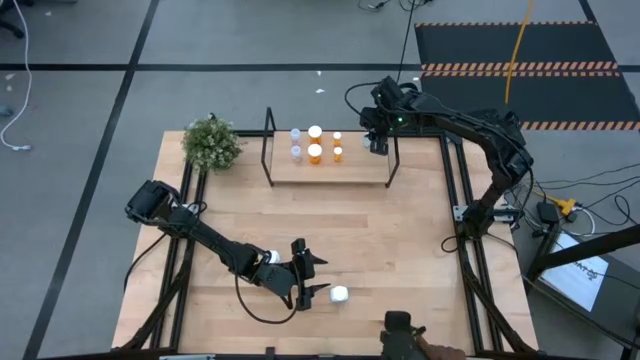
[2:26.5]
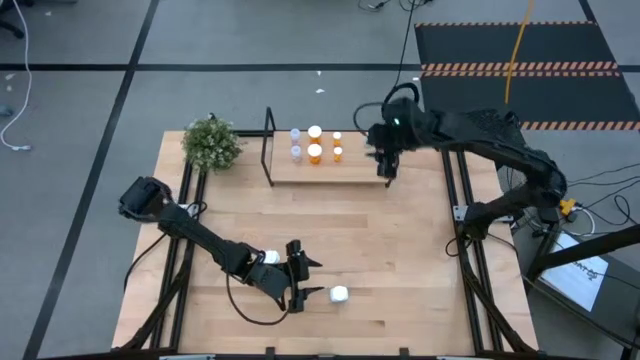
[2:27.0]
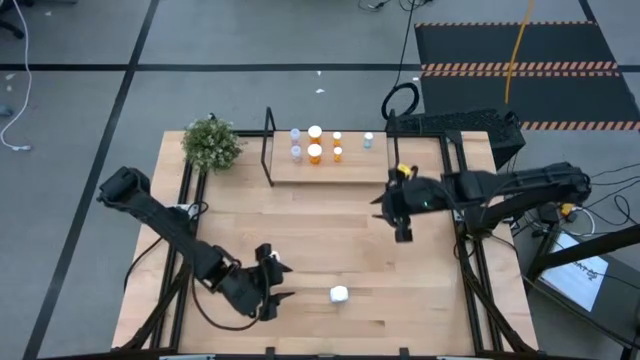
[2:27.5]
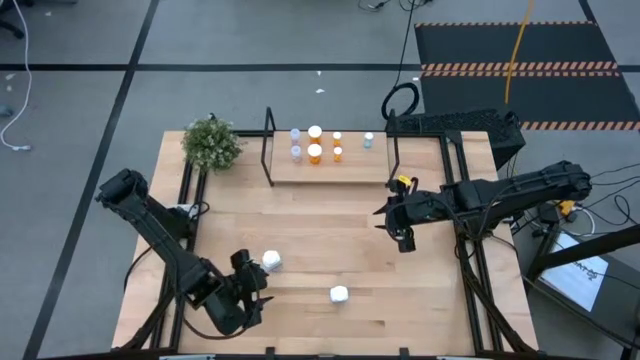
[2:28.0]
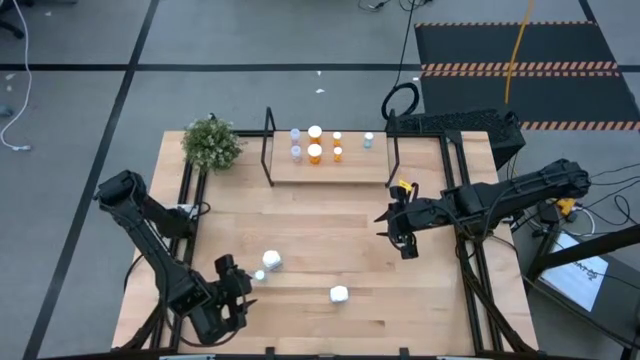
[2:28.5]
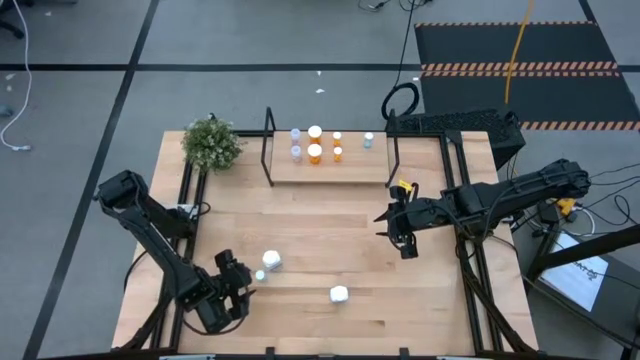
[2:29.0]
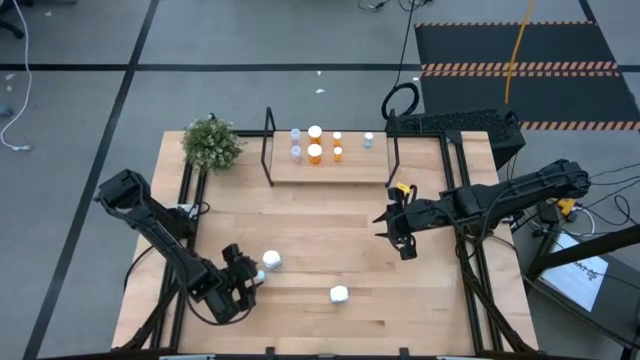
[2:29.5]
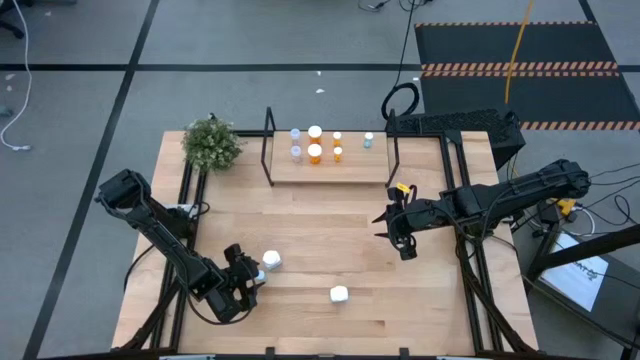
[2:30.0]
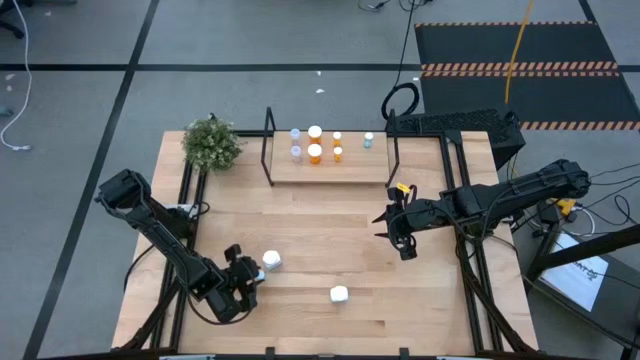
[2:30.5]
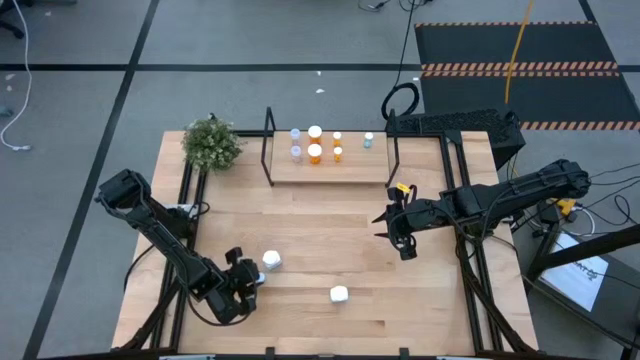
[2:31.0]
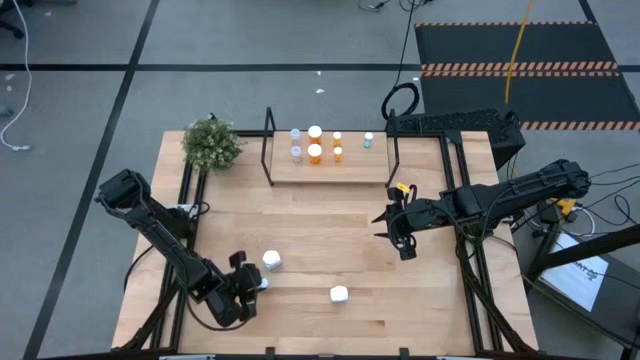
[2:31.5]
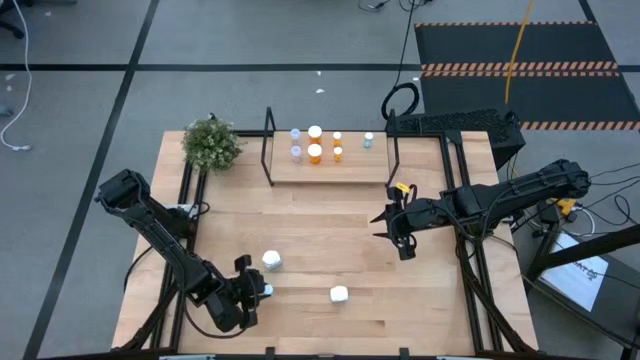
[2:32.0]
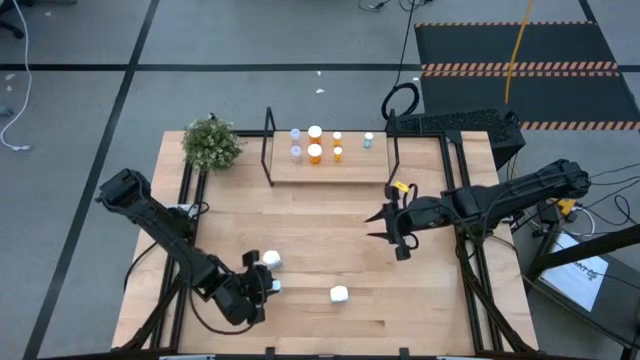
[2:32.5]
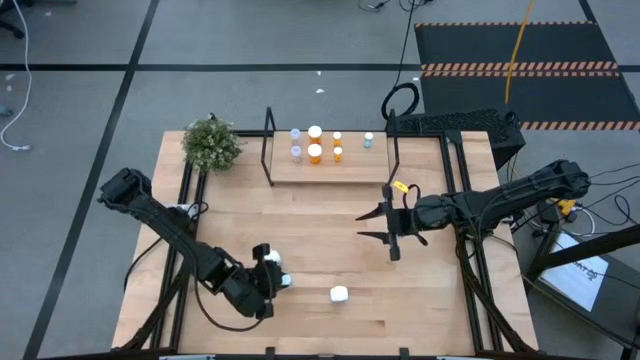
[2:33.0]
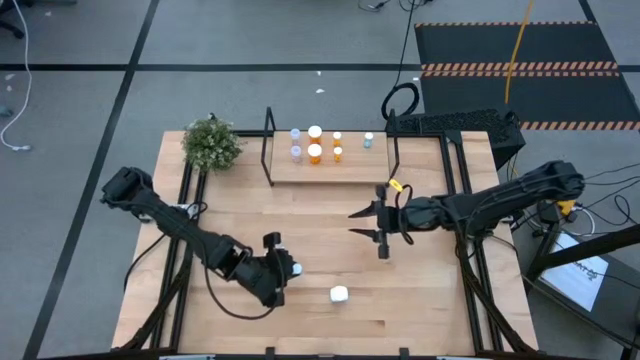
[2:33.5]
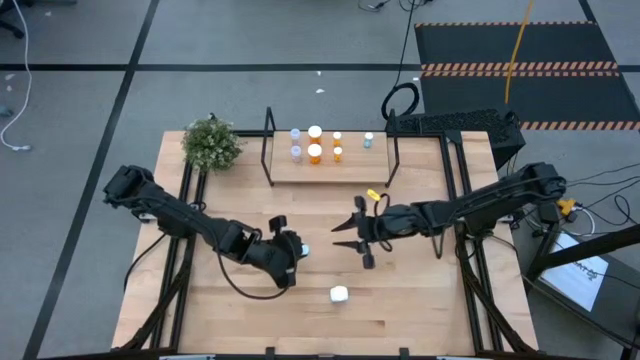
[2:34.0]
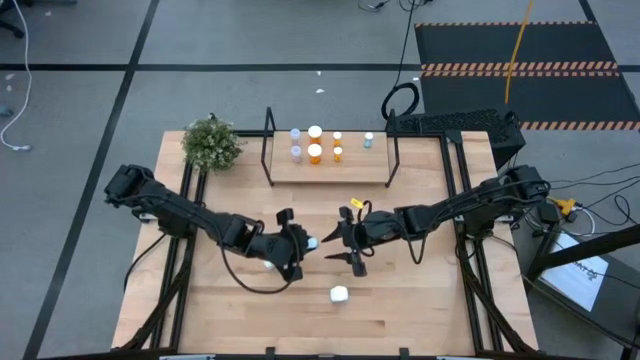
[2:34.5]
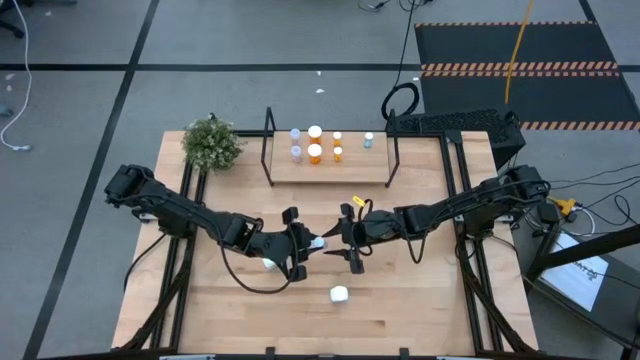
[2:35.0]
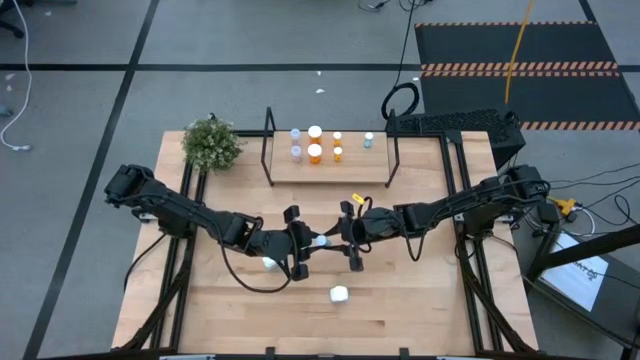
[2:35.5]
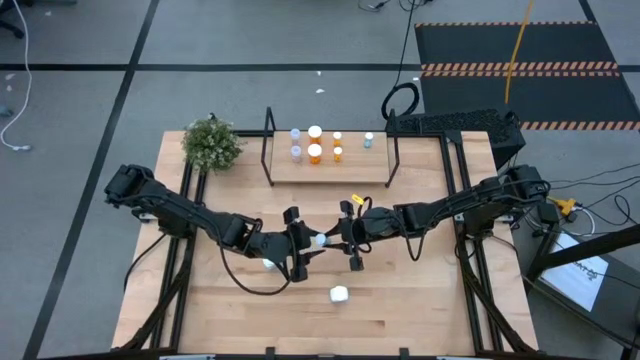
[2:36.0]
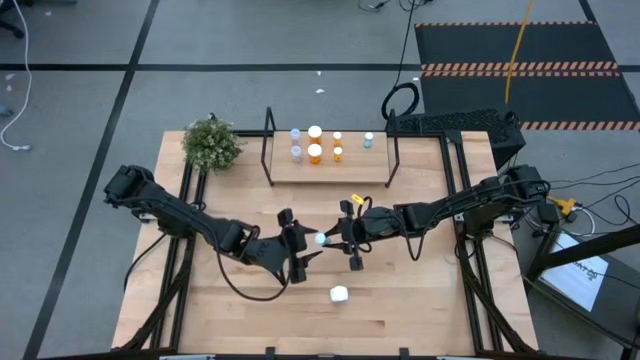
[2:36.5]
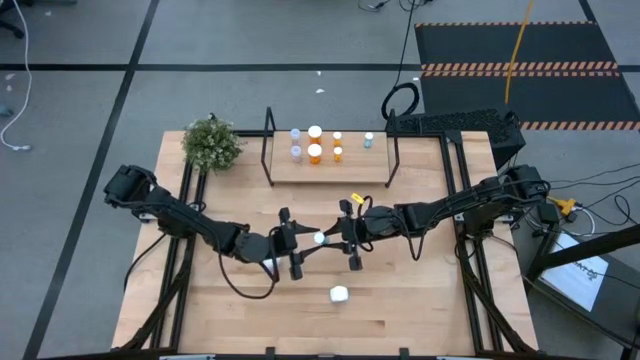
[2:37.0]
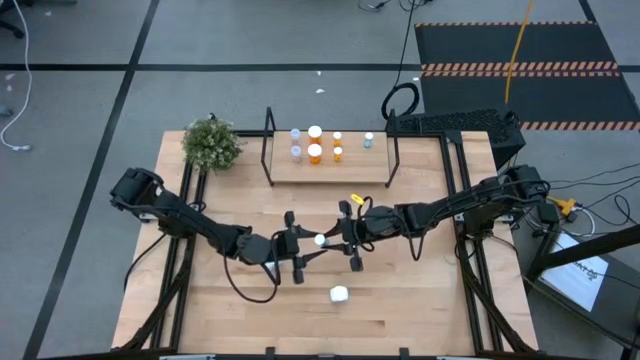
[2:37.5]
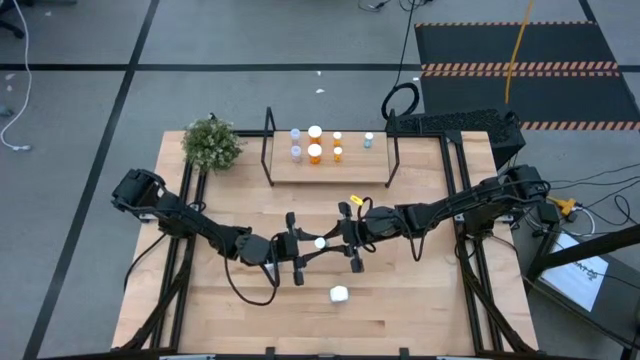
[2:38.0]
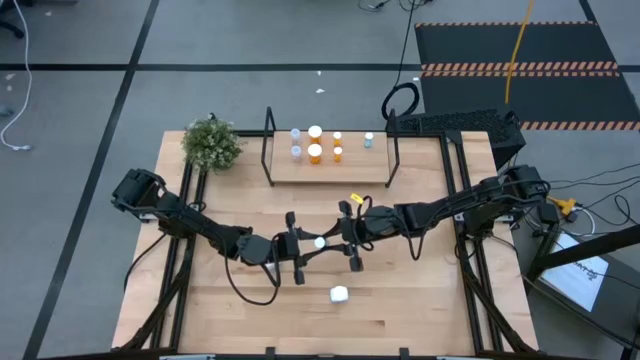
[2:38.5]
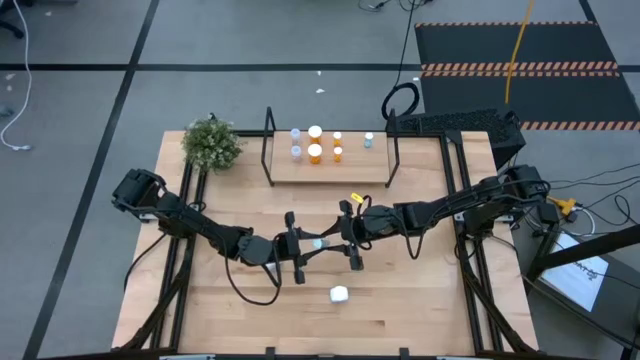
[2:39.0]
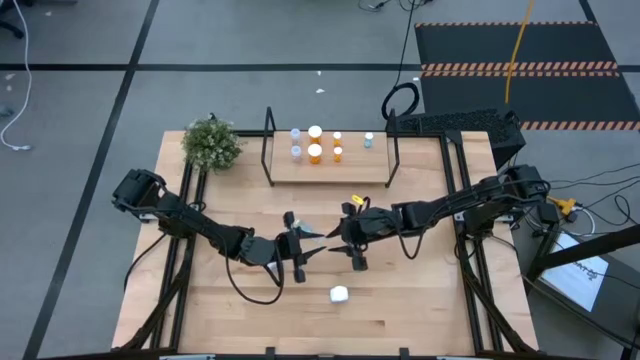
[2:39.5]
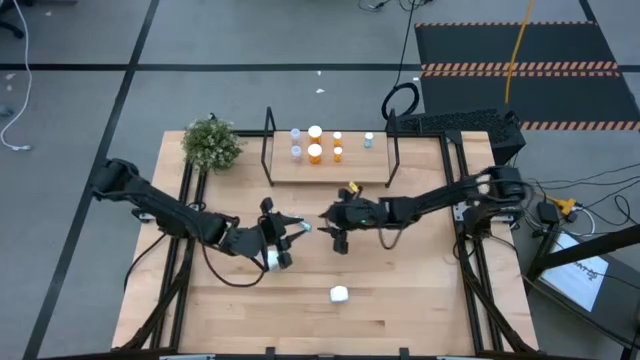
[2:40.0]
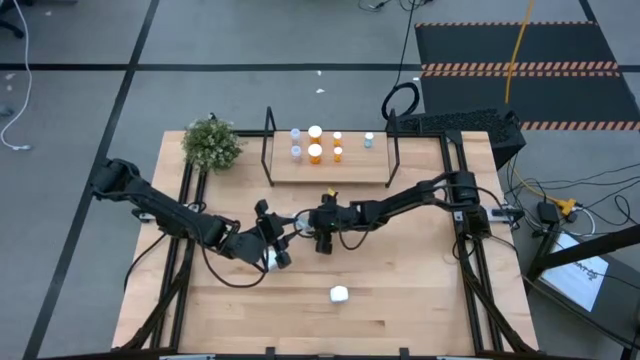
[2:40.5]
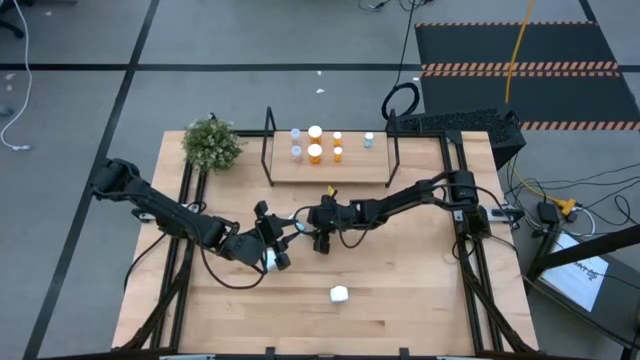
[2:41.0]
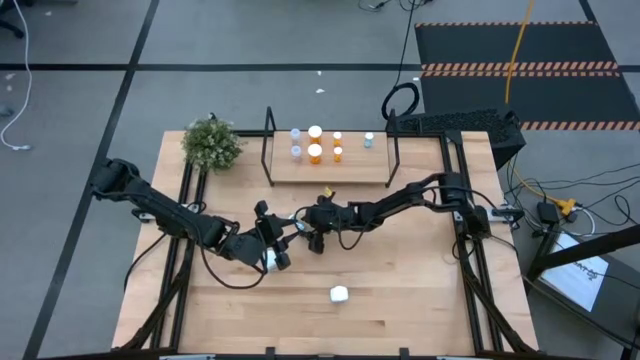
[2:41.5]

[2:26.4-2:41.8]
Task: Pick and place medicine bottles onto shelf by color
Put the blue pill bottle on the shelf aligned with the other blue pill bottle

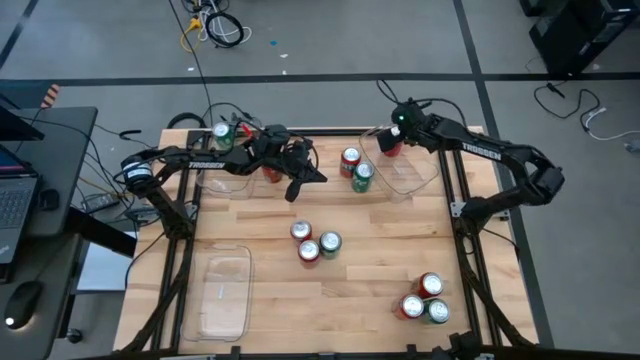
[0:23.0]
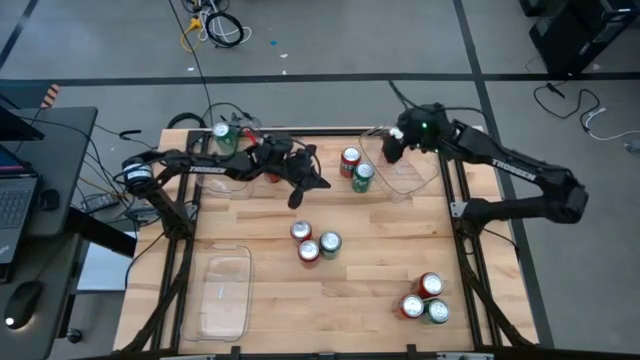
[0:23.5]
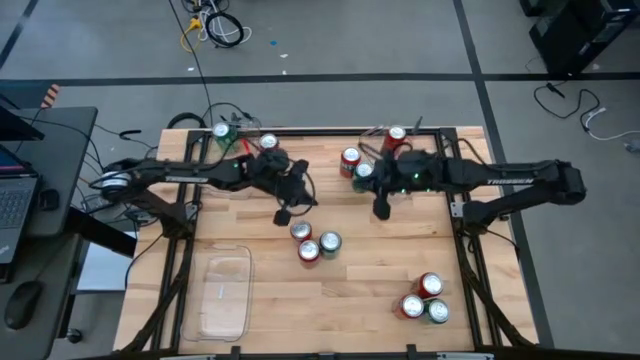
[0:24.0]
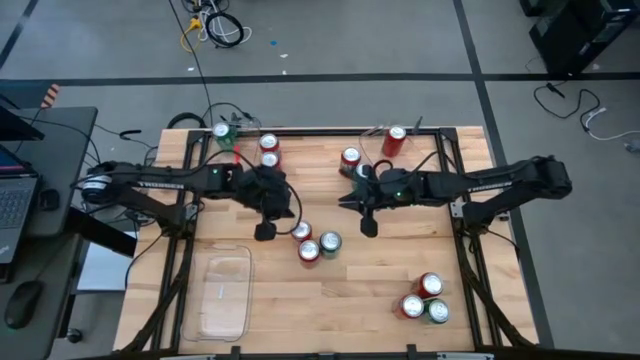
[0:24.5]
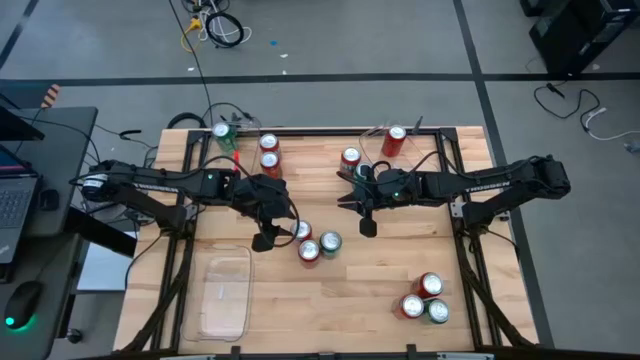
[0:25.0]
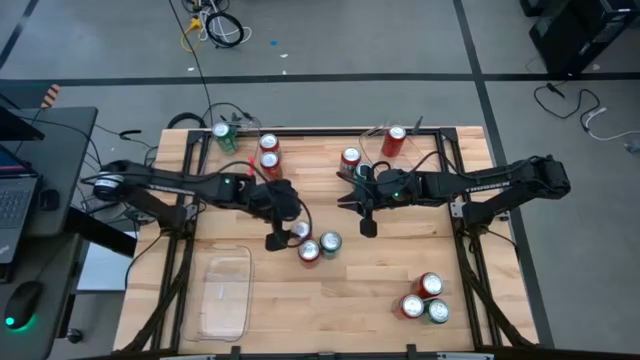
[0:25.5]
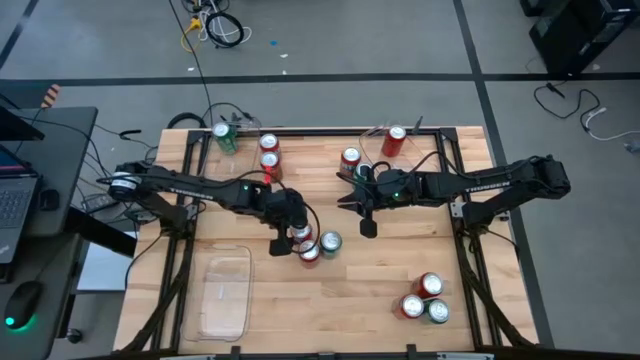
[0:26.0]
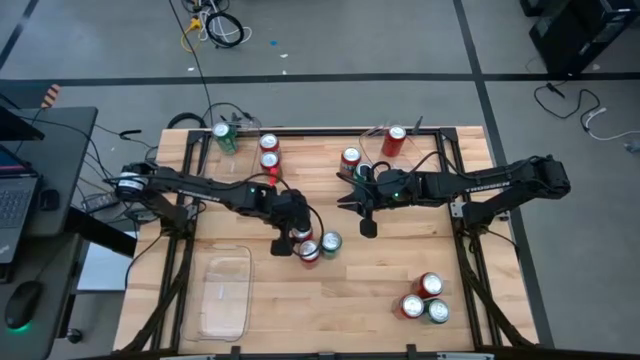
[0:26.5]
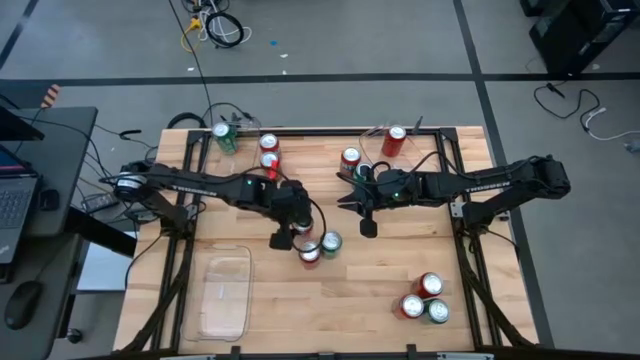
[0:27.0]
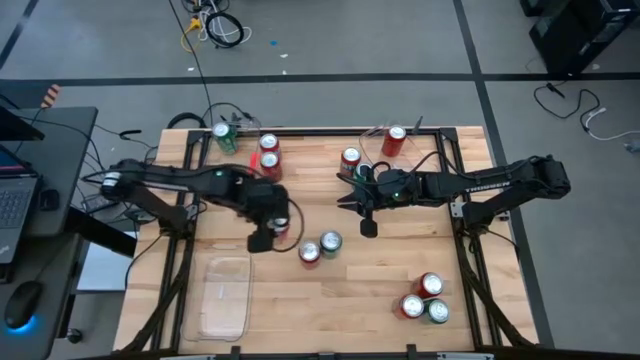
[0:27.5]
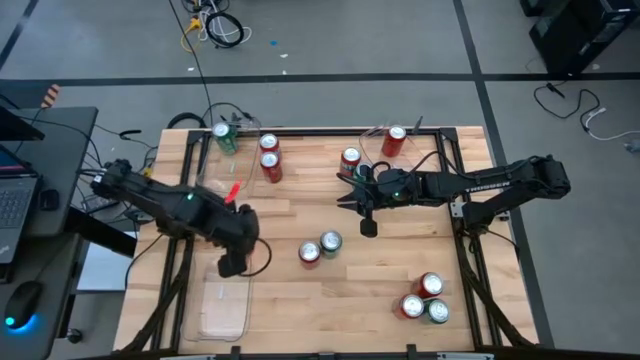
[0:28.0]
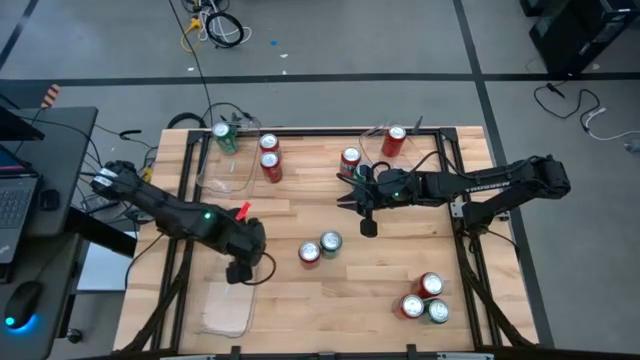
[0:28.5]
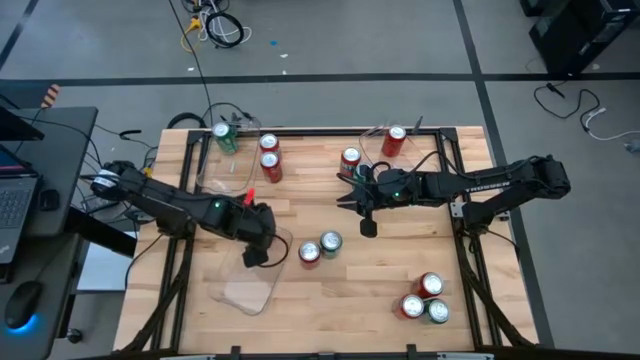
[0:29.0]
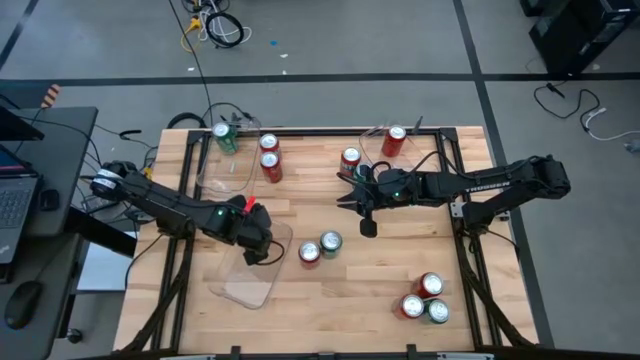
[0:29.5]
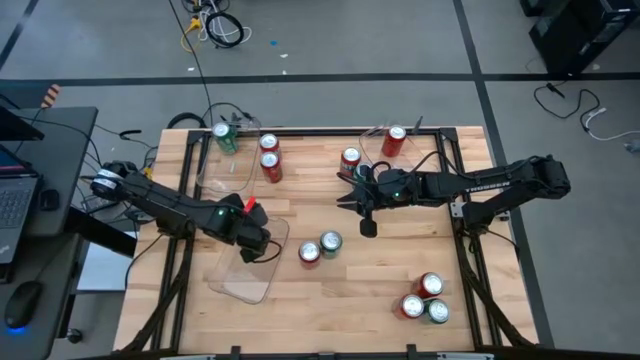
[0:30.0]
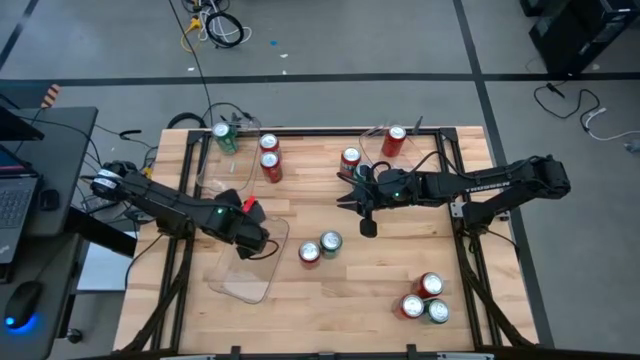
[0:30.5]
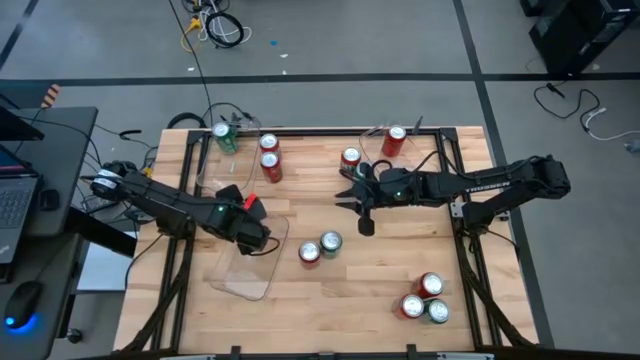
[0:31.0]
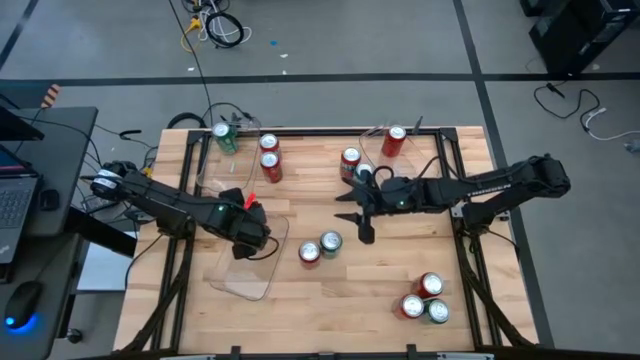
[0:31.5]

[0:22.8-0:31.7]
Task: Sort soda cans
Put the center red soda can into the bottom transparent bin
